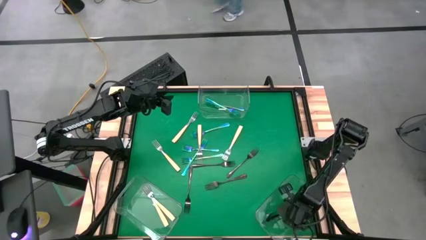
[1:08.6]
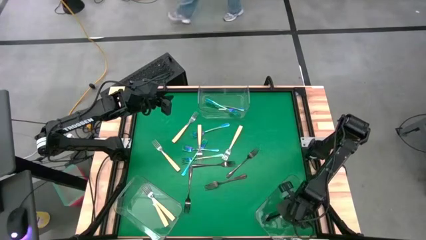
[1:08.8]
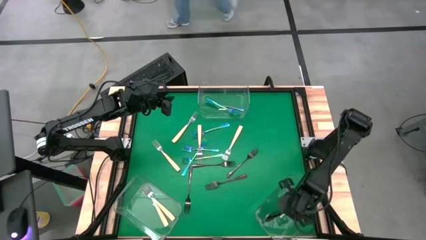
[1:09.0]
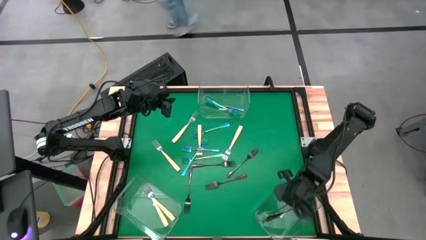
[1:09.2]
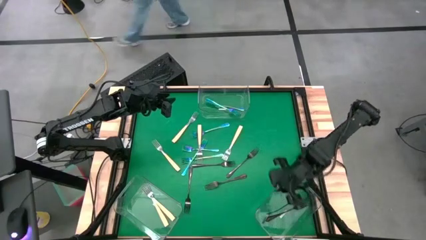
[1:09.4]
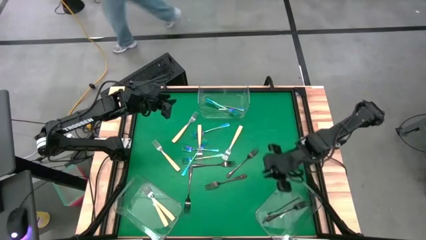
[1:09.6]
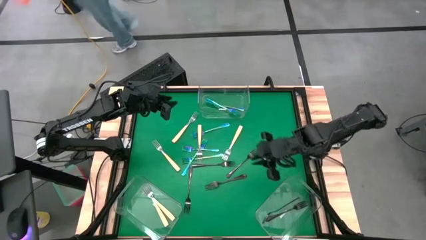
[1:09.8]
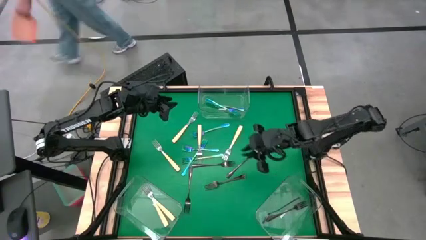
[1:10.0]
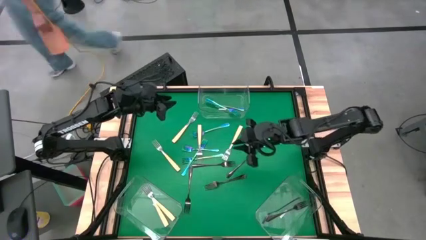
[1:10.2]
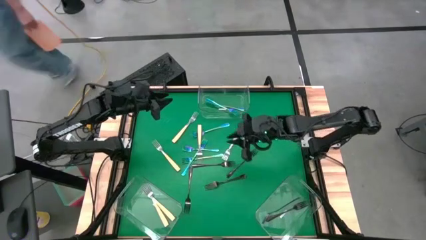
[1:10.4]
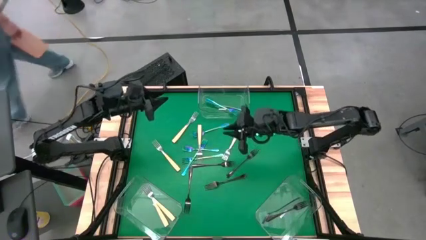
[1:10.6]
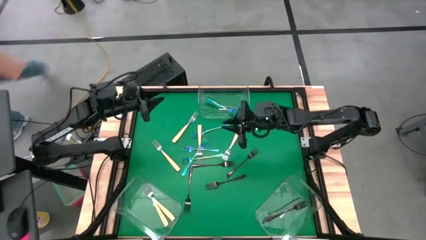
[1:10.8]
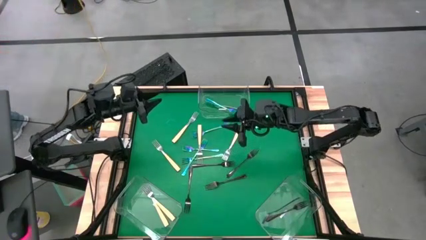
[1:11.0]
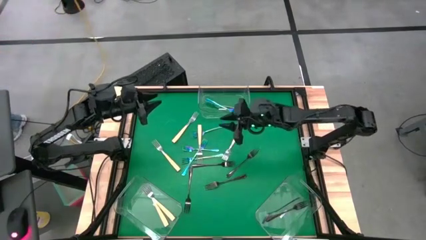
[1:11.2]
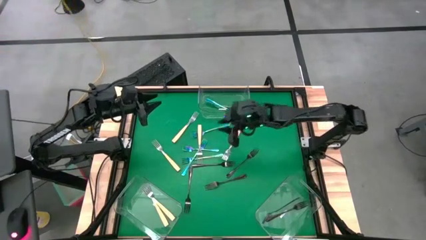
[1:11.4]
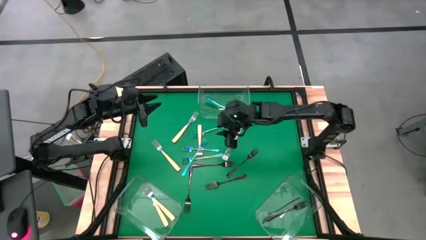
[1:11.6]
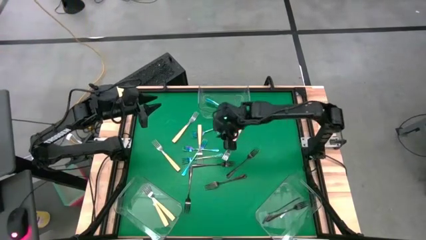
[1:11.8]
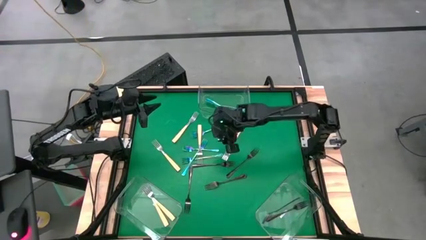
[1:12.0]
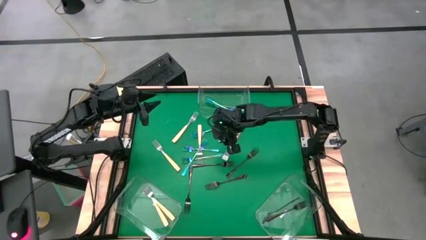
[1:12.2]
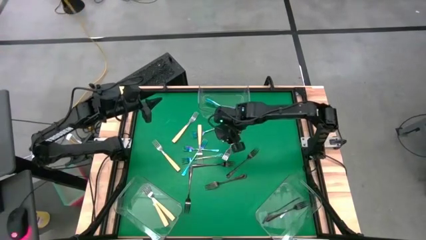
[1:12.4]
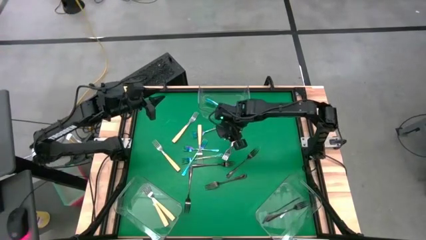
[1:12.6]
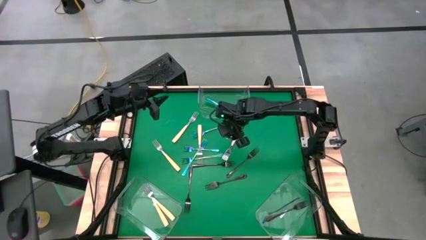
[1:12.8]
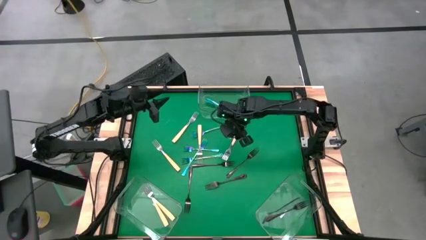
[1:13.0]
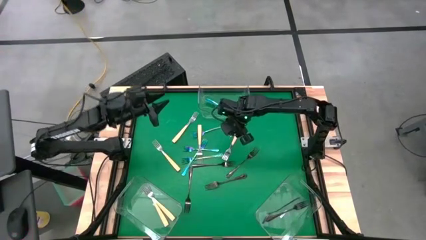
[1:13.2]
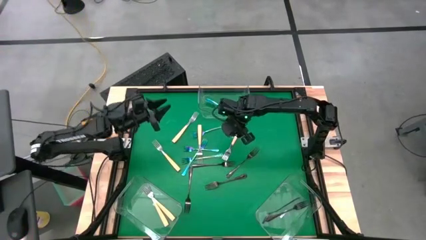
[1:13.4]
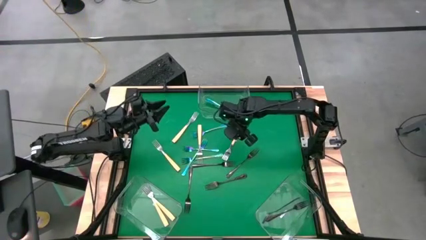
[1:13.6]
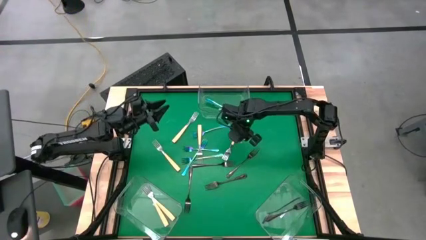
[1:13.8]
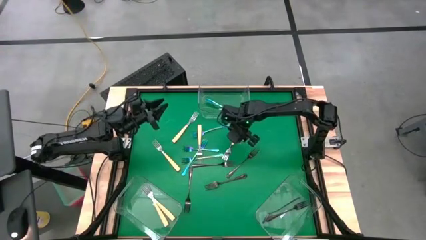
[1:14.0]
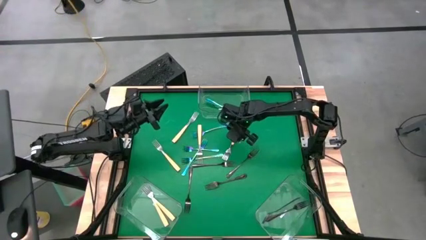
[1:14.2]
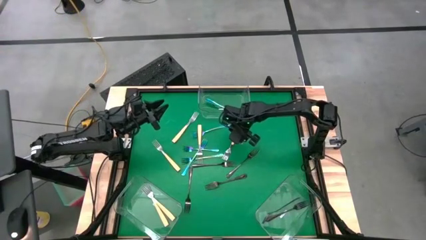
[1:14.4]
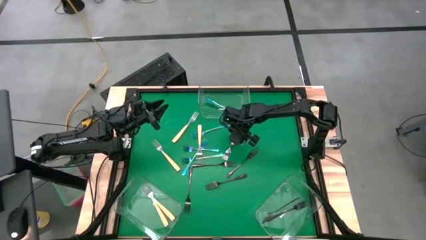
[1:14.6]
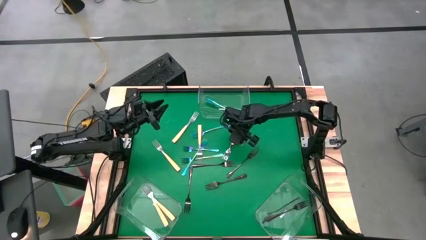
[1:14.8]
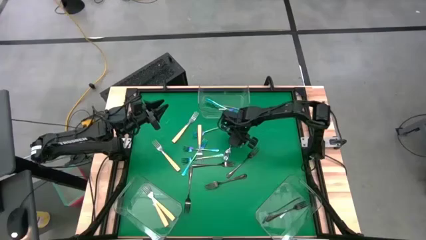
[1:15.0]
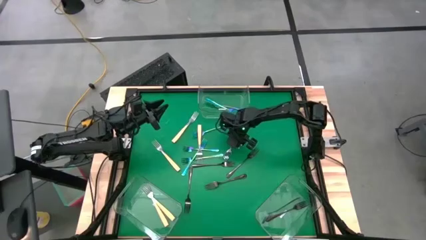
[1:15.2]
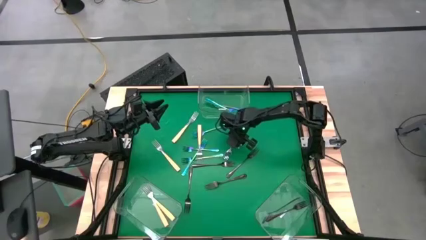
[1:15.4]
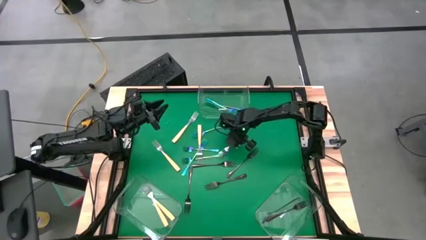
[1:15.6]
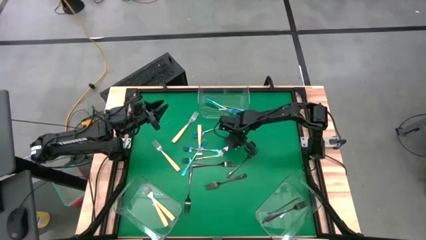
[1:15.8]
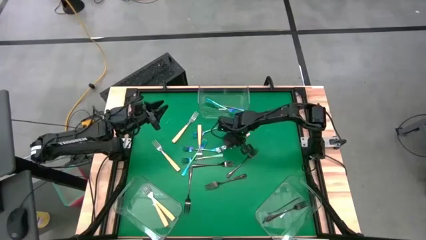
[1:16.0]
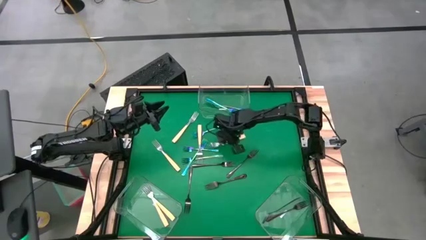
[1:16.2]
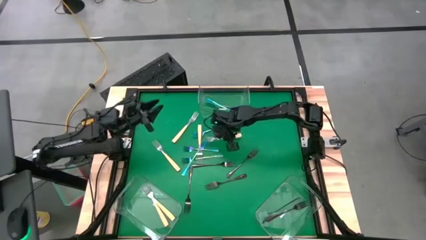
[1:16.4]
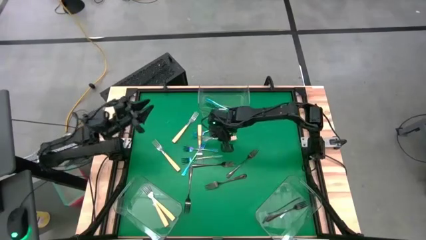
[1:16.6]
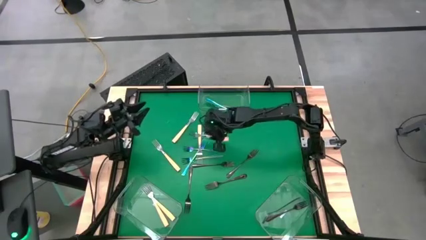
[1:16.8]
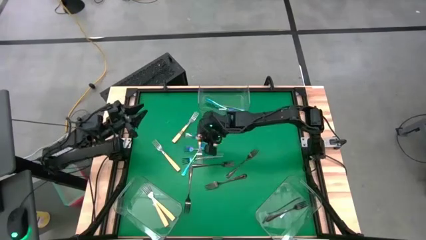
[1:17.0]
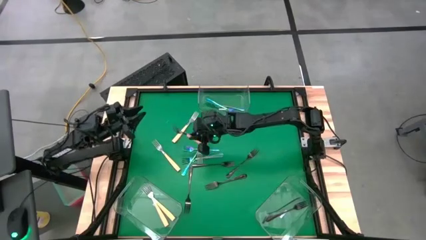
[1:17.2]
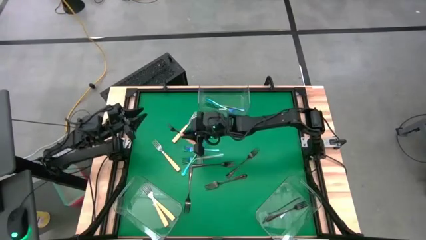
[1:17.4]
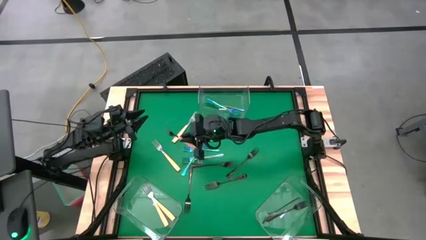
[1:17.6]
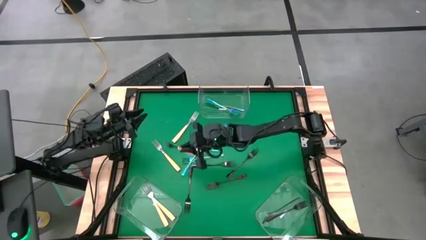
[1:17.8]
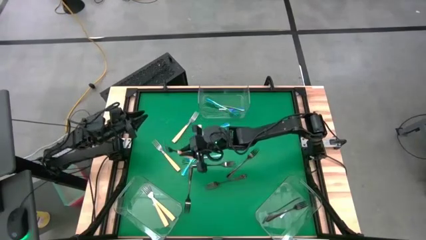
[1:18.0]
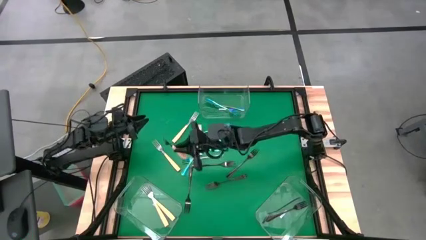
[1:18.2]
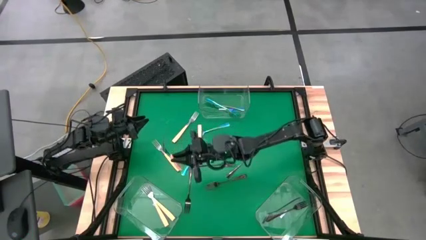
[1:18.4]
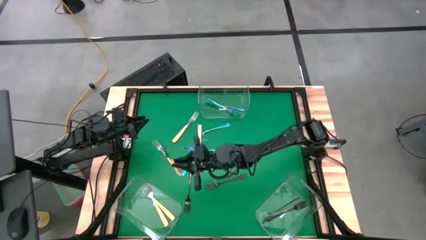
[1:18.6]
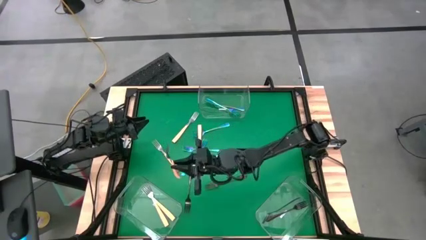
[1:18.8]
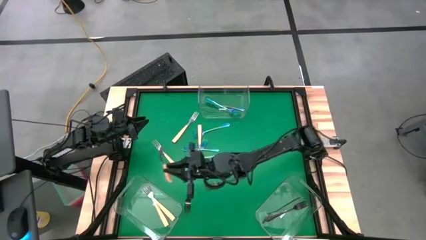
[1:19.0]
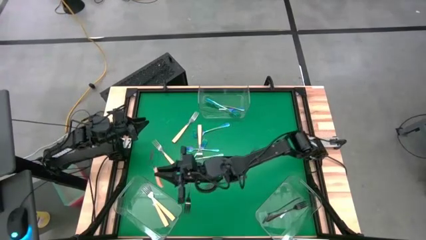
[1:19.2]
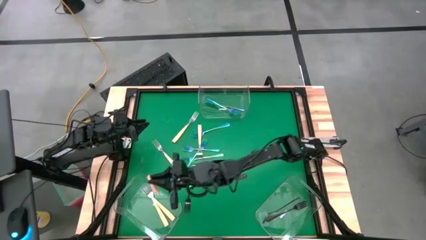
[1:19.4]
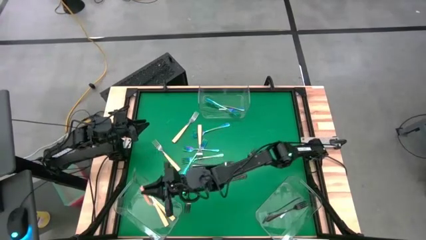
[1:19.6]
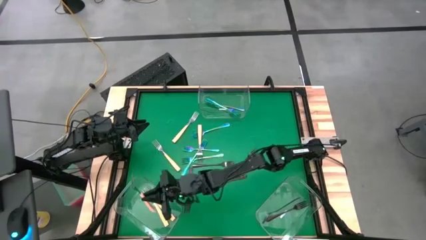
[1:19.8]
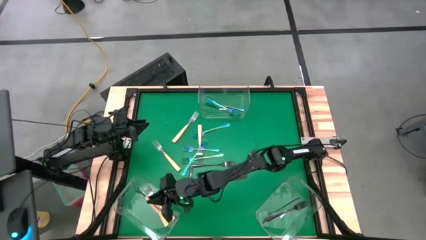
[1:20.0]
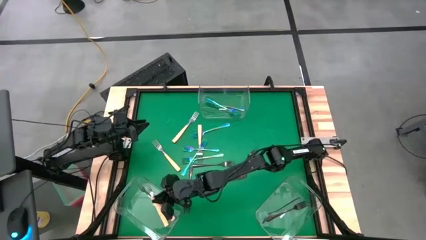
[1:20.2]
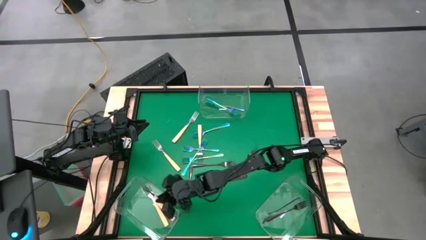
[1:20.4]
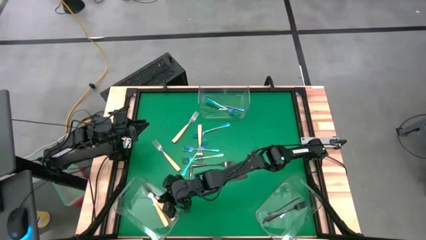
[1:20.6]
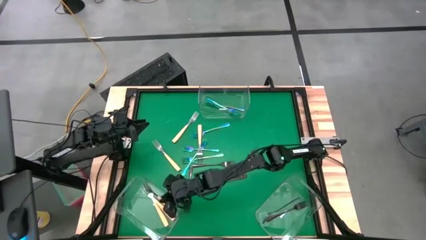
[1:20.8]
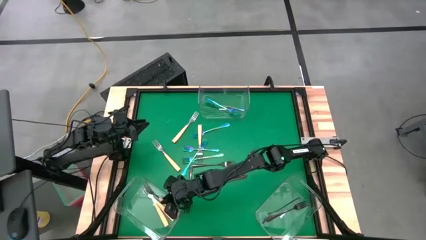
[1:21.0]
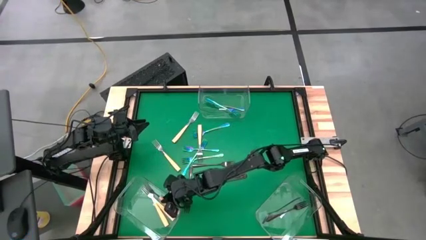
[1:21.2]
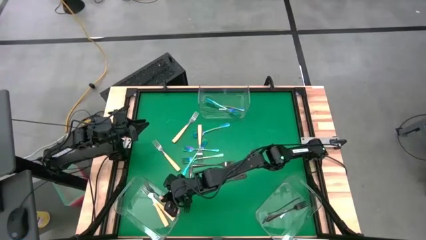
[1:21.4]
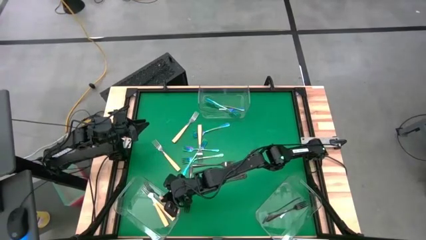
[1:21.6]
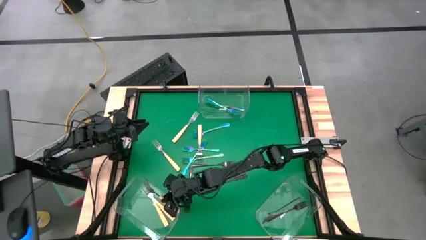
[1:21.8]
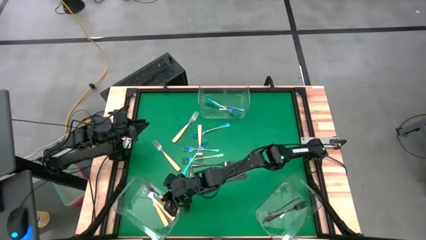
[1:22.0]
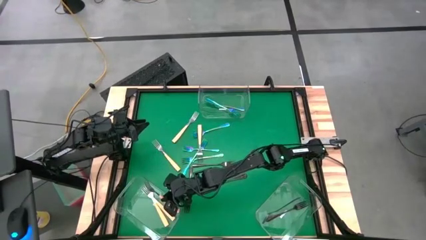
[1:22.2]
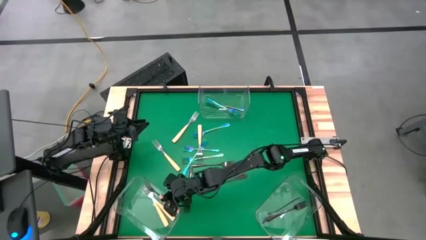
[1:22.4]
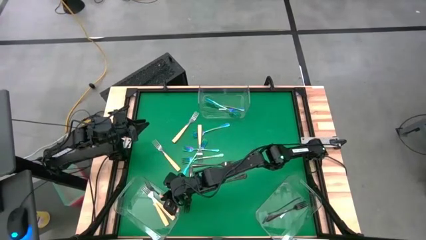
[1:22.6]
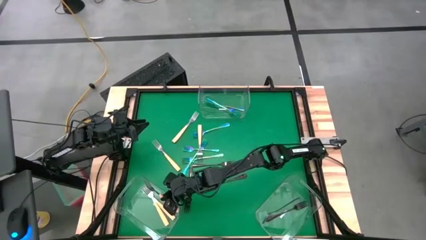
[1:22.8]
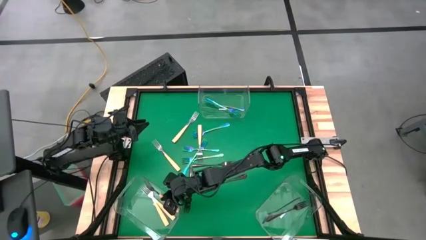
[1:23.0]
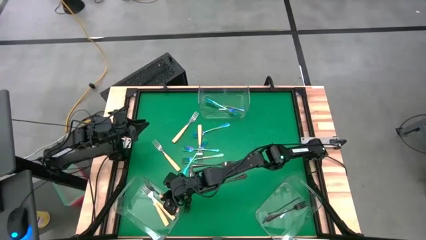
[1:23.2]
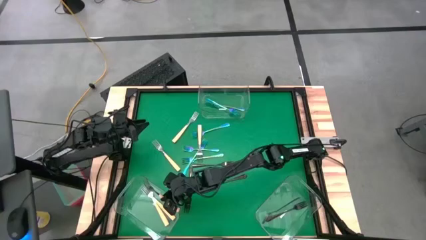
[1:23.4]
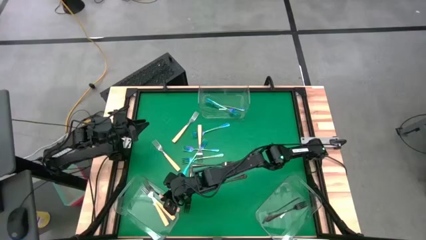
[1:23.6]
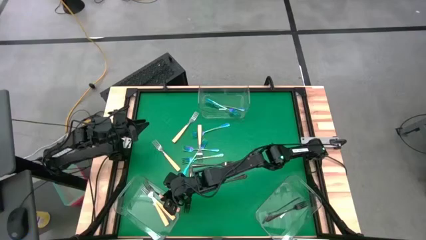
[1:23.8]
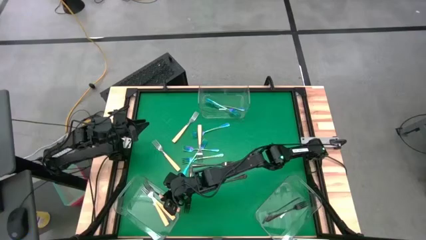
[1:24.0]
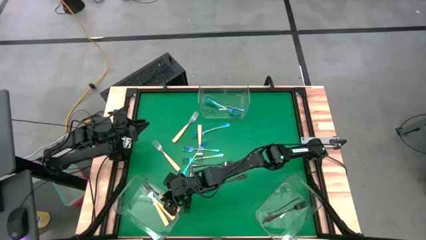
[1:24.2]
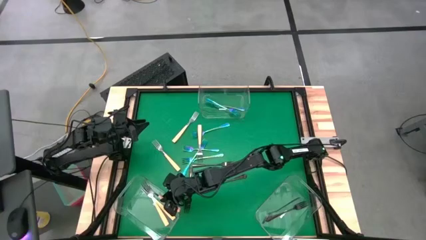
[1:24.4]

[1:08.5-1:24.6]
Task: Sort silverware by color (type)
Put the orange fork into the bottom left transparent bin

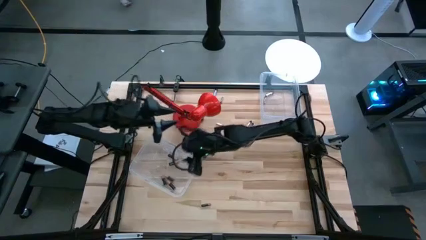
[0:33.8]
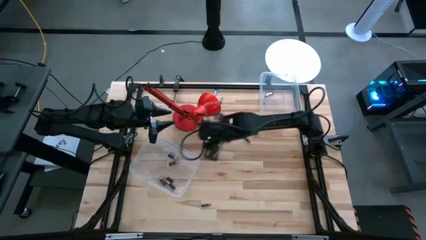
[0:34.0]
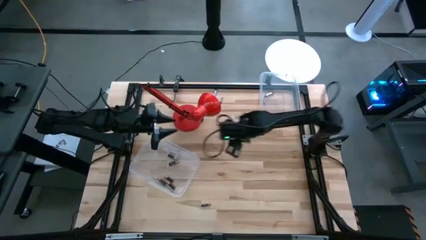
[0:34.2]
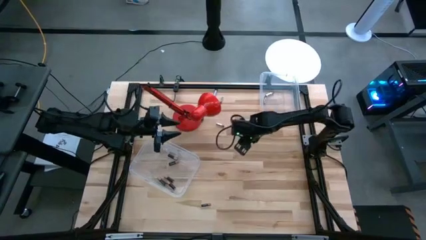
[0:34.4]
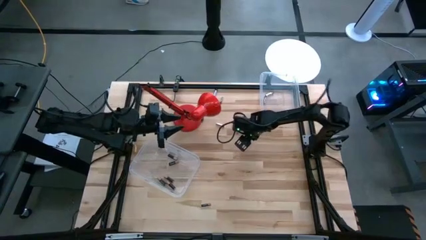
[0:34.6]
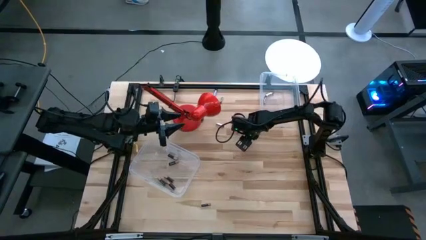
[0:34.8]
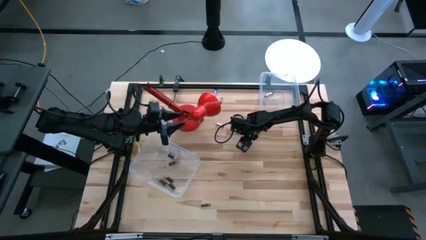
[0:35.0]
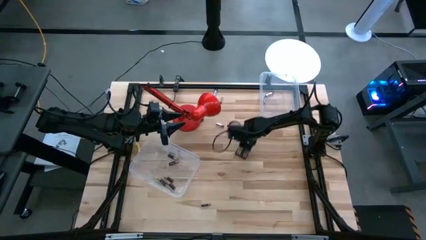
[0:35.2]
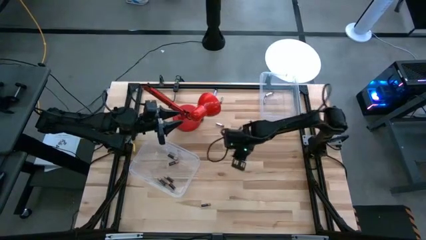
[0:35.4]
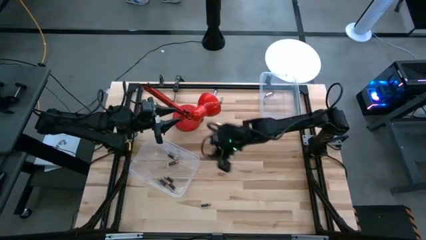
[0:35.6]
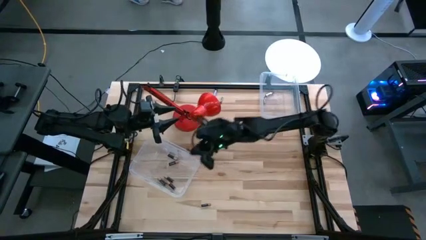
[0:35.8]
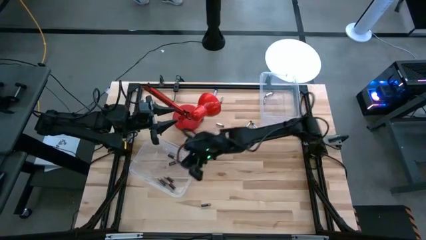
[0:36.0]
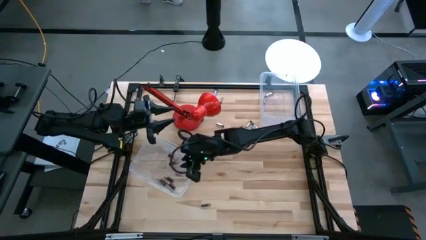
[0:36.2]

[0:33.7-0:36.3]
Task: Sort batteries
Put the black battery into the bottom transparent bin
